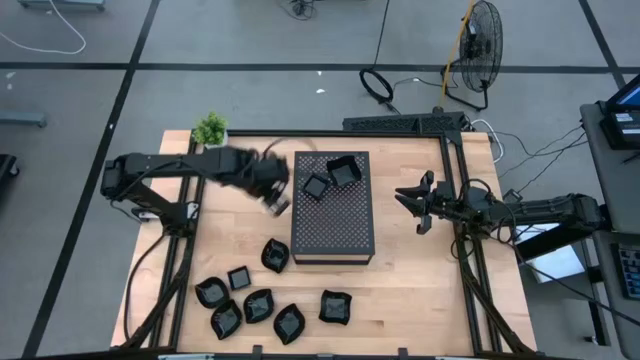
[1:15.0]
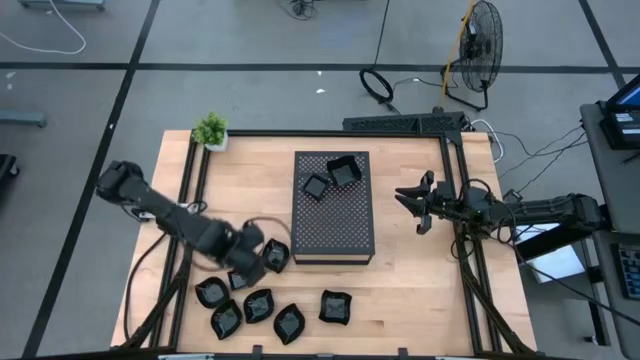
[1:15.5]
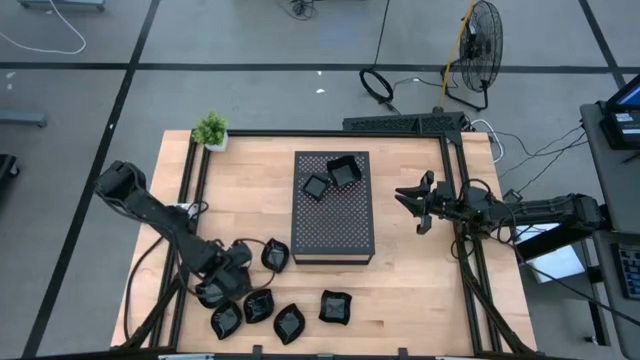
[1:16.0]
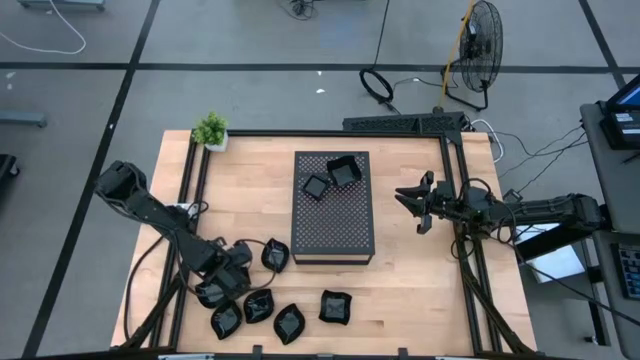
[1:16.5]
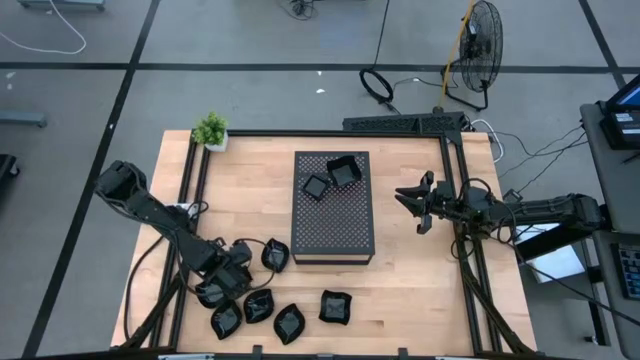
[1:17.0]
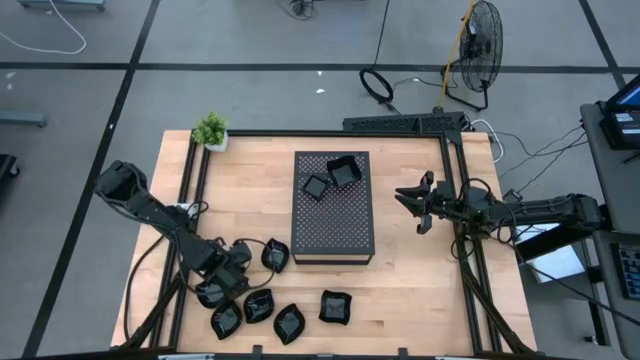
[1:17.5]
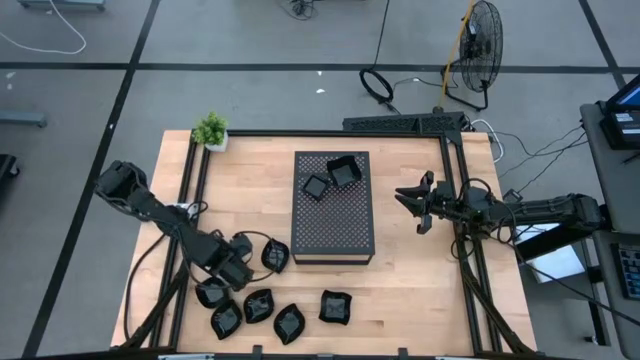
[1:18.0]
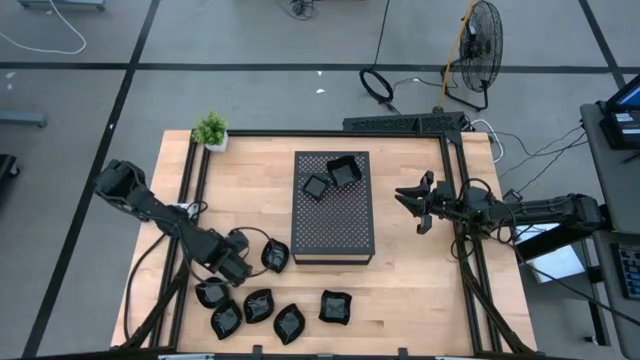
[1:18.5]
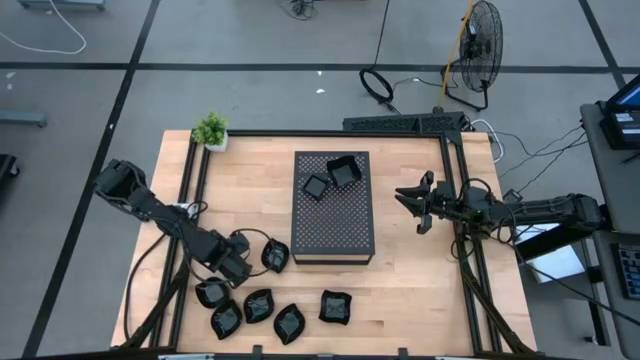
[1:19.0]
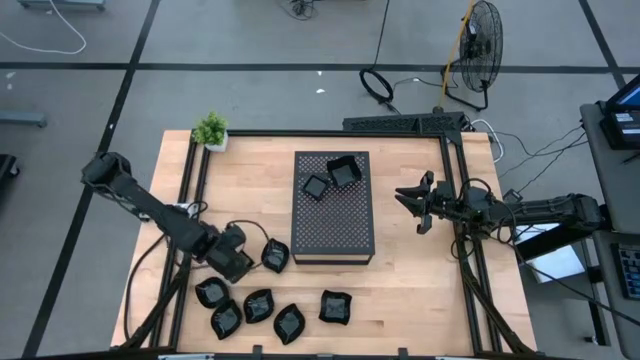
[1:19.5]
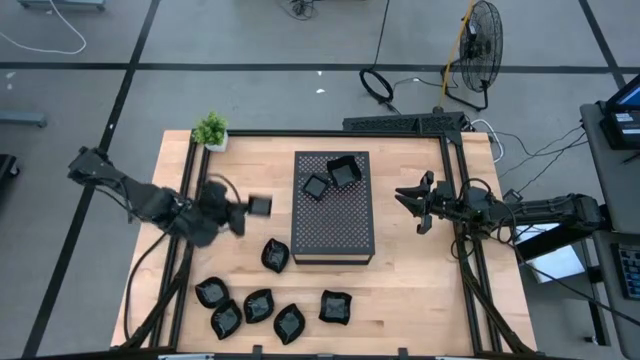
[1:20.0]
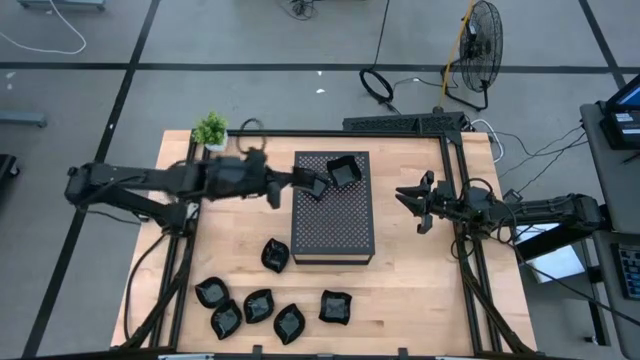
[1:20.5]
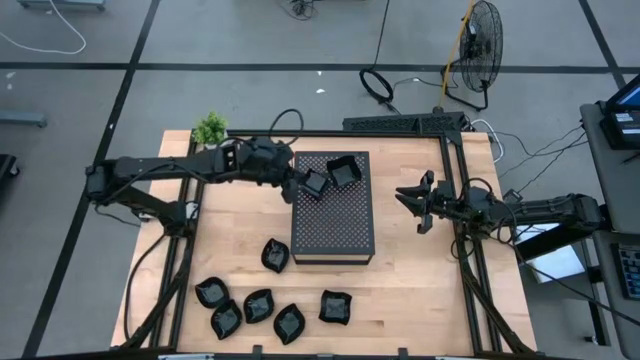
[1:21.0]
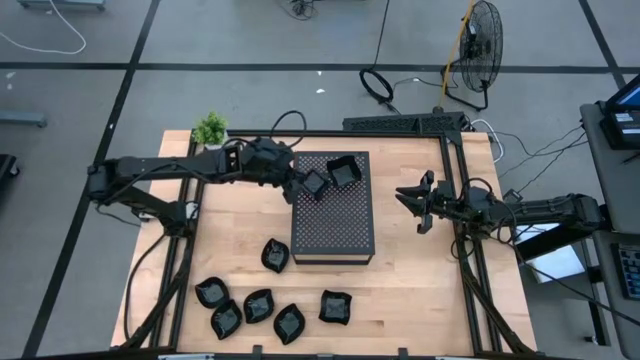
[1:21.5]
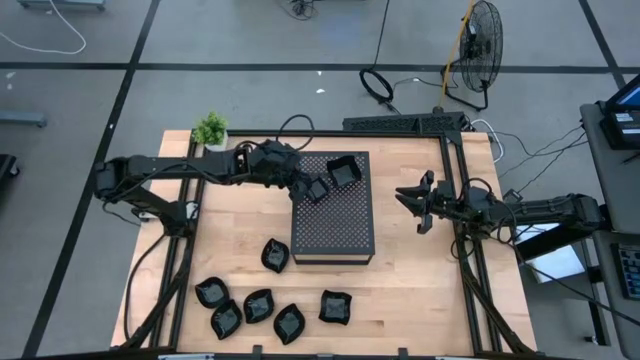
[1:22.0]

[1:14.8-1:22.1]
Task: Pick & Place Mini shaped plates
Stack the black square plate on top of the black square plates on the shelf

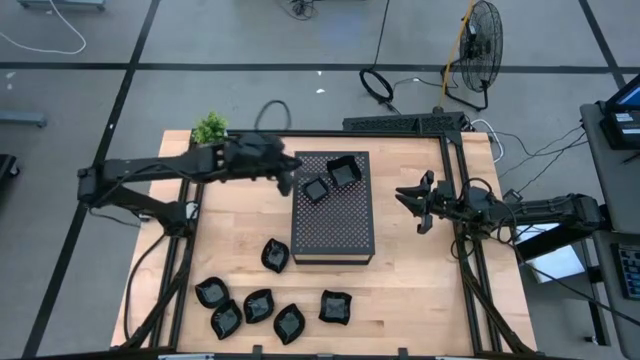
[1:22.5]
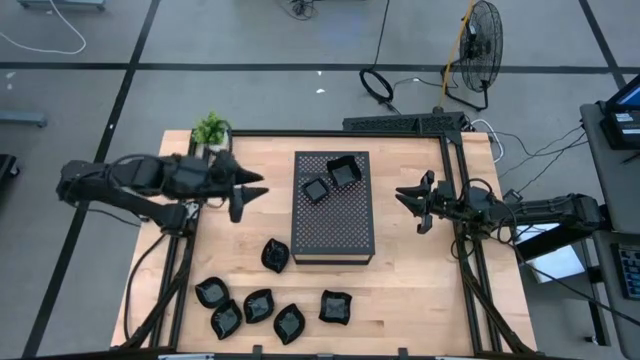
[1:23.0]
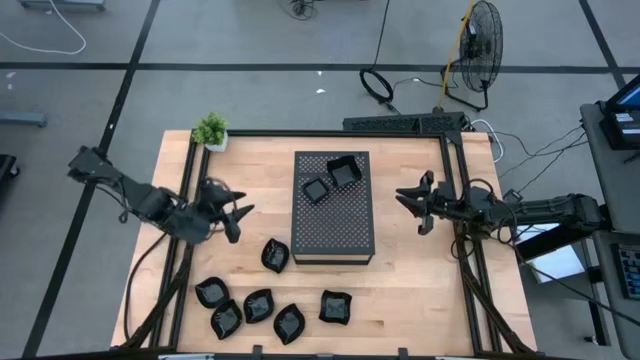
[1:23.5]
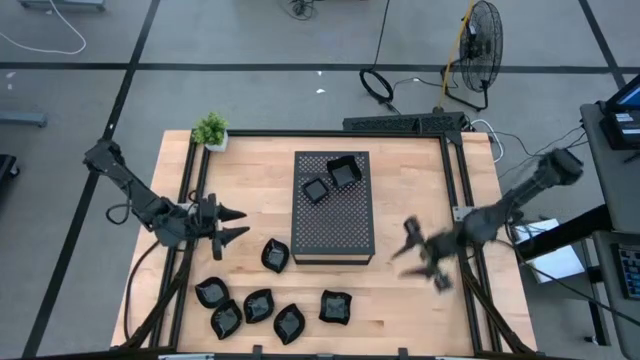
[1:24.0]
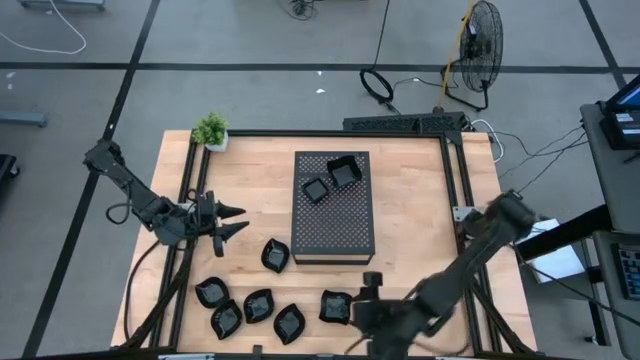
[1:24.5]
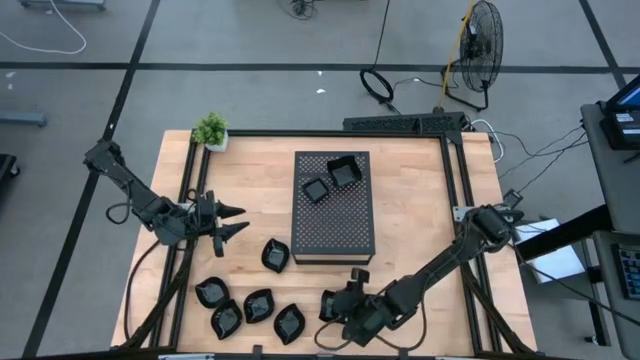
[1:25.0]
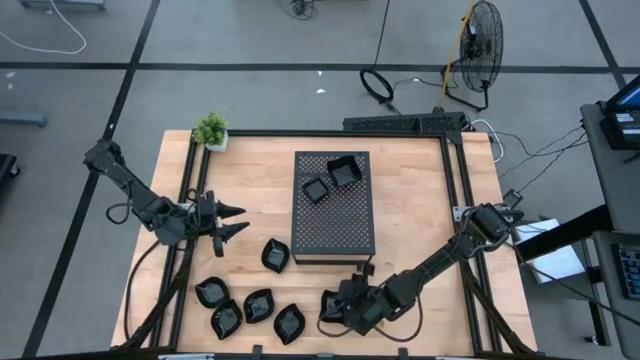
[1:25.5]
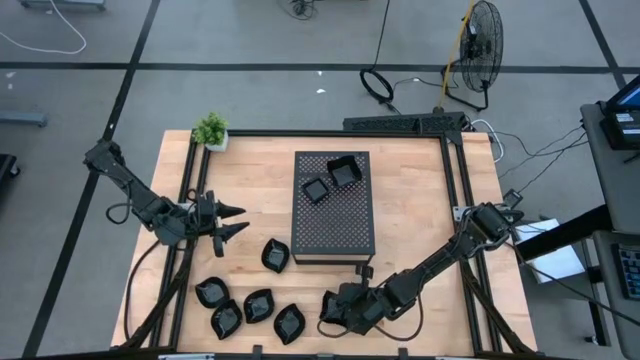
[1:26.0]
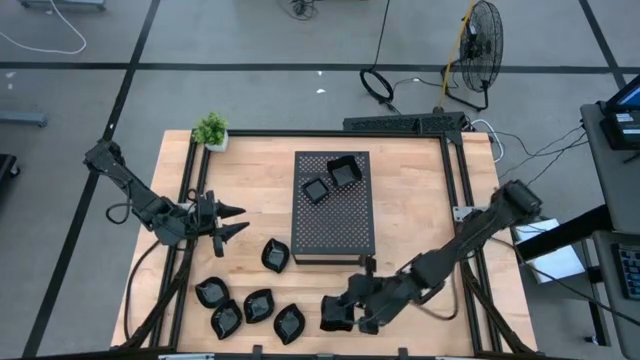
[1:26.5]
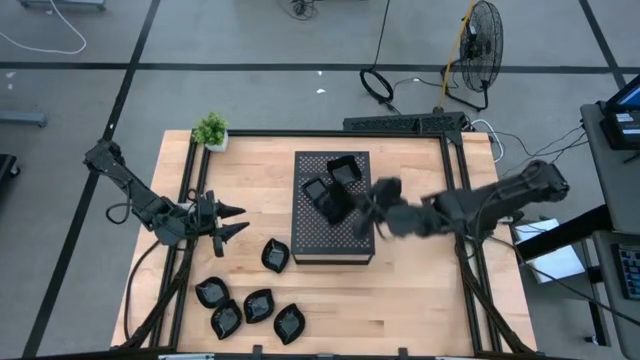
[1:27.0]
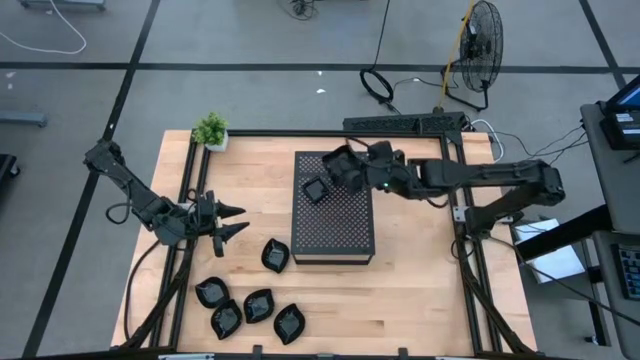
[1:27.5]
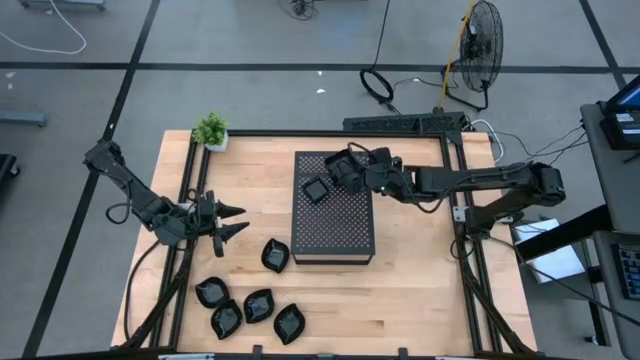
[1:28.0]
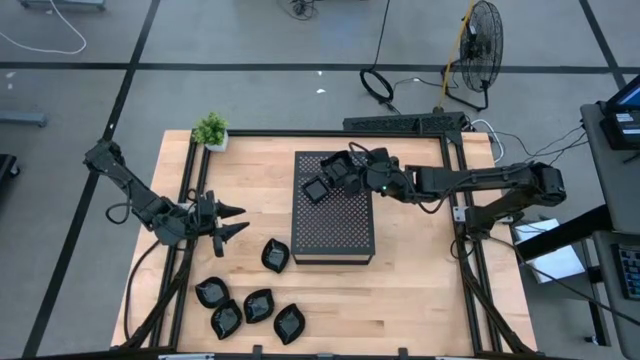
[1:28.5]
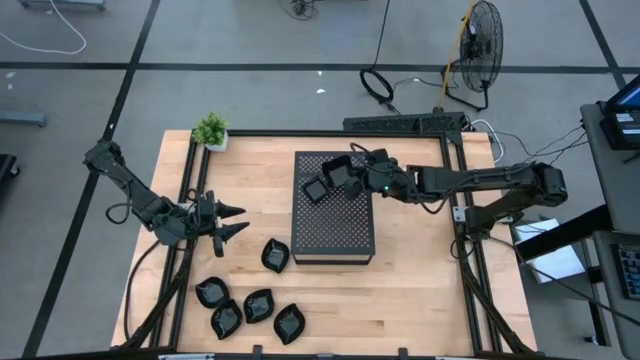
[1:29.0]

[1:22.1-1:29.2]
Stack the black distorted square plate on top of the black distorted square plates on the shelf

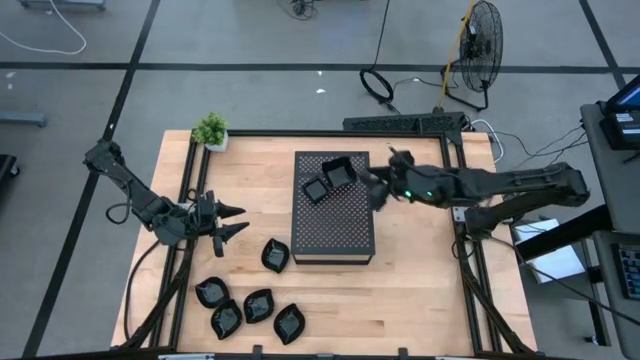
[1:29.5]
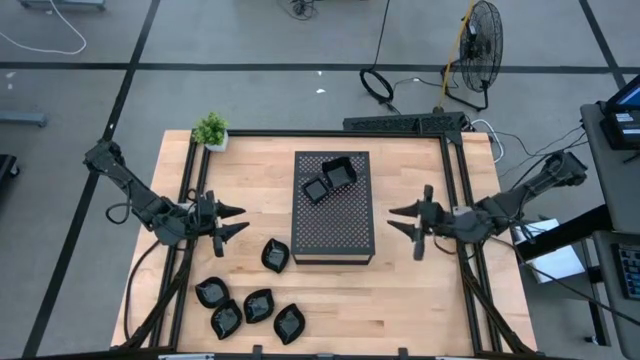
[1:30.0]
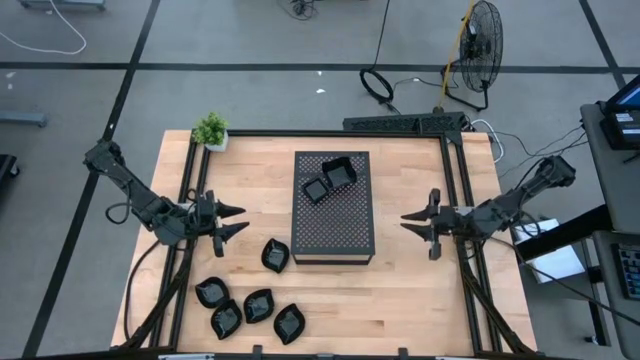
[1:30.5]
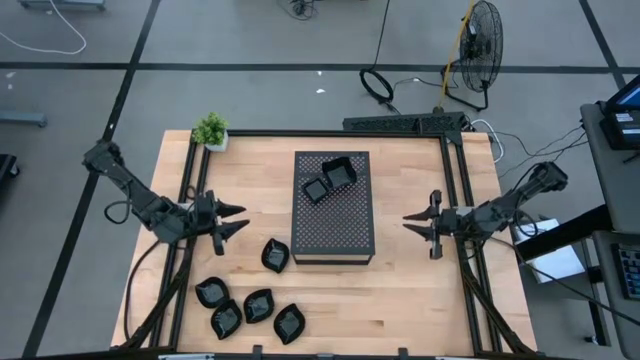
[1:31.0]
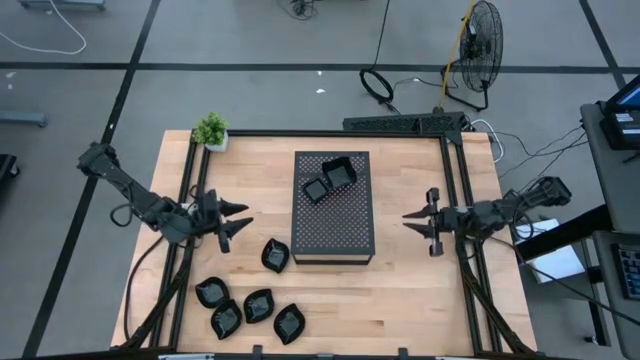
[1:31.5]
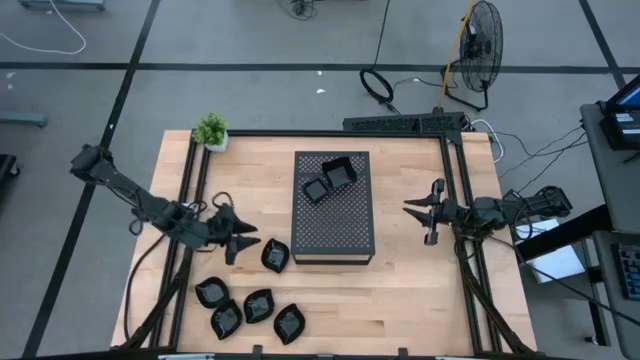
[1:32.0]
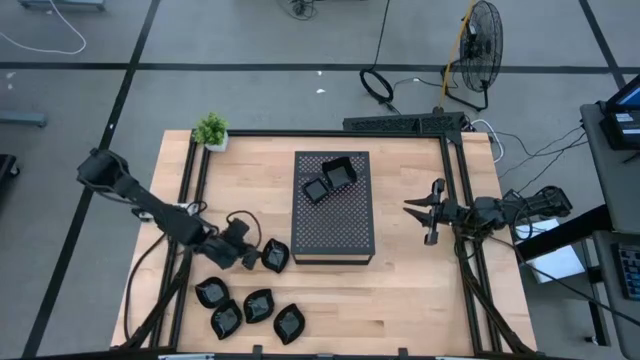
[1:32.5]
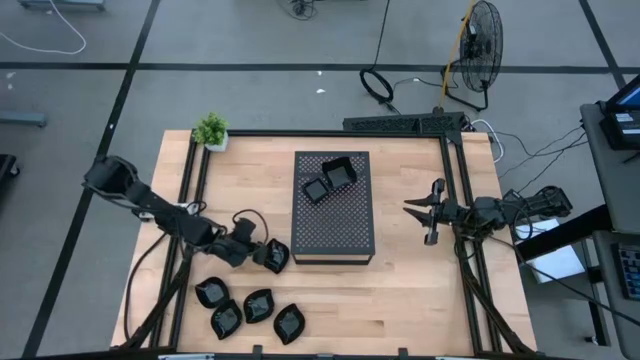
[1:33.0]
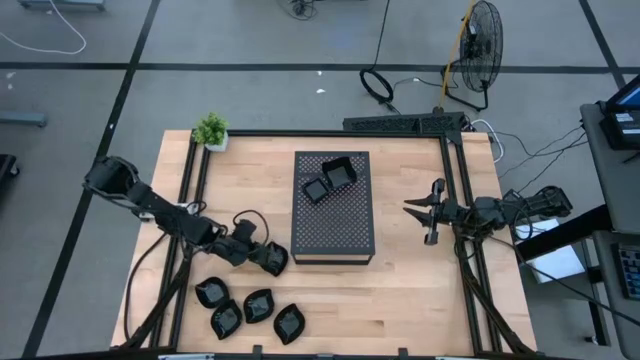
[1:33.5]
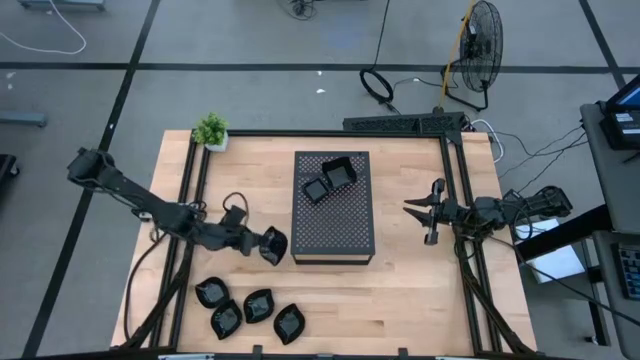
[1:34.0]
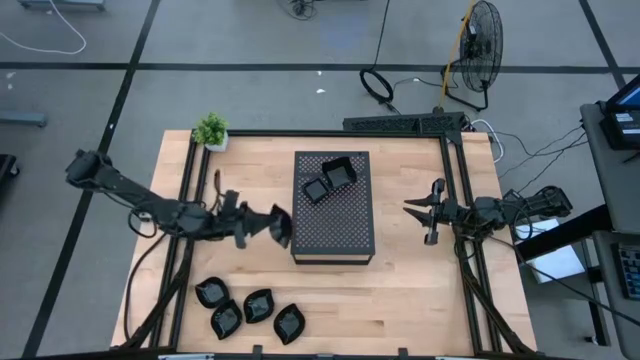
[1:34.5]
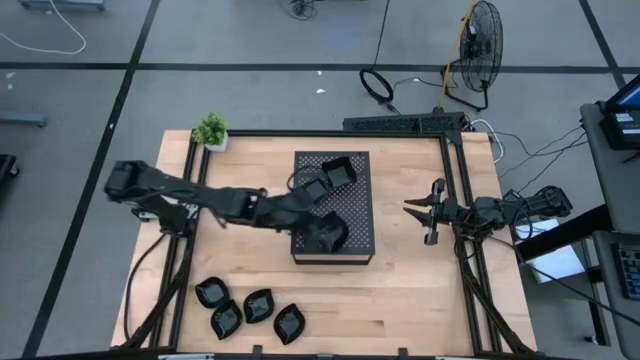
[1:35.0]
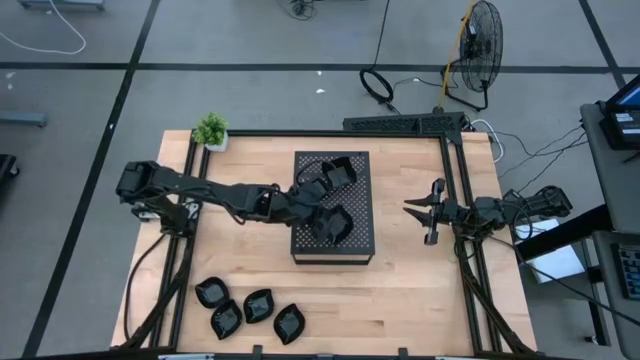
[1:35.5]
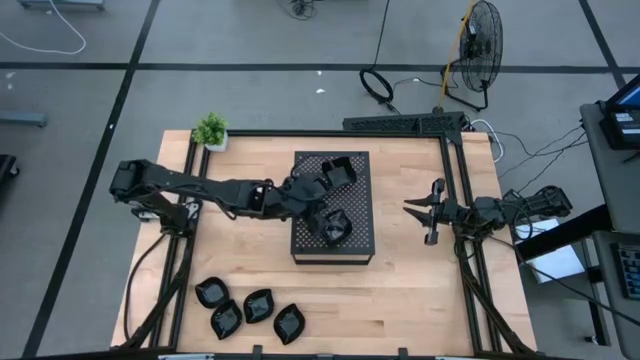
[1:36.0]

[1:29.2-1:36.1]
Put the black leaf shaped plate on the shelf
